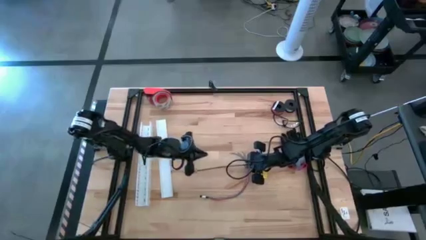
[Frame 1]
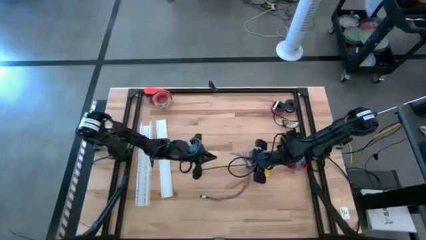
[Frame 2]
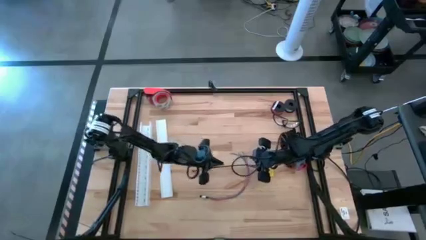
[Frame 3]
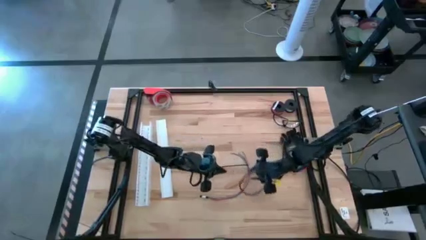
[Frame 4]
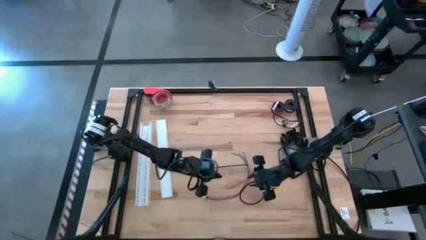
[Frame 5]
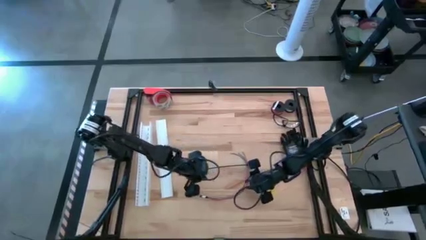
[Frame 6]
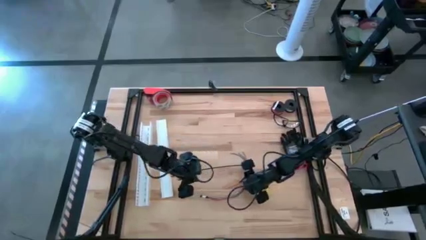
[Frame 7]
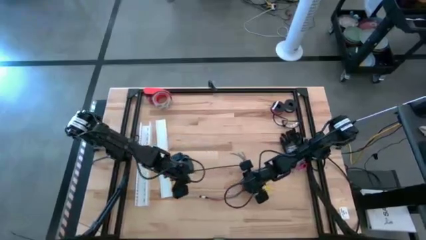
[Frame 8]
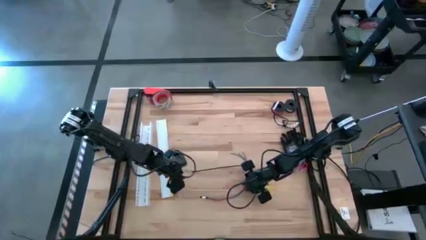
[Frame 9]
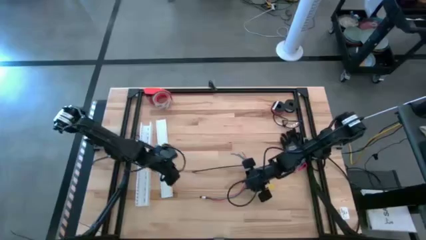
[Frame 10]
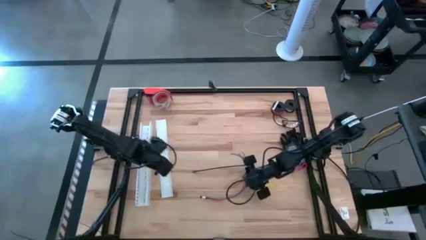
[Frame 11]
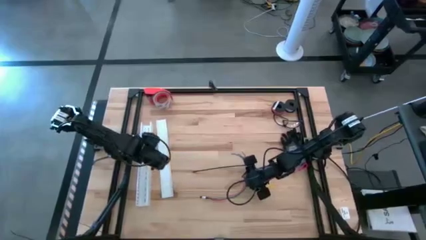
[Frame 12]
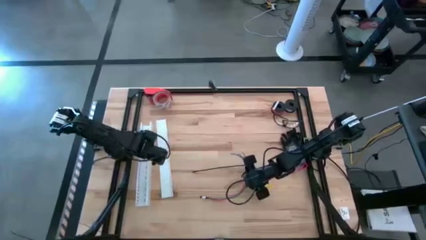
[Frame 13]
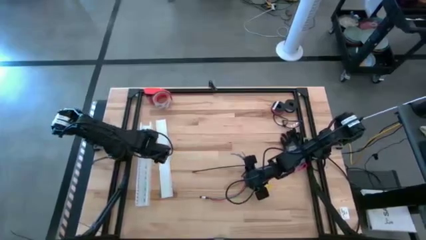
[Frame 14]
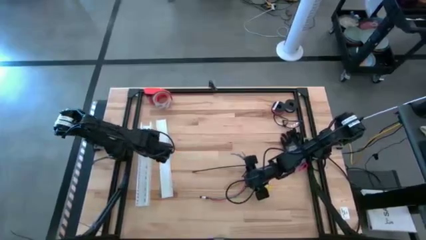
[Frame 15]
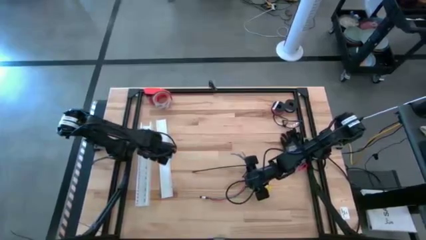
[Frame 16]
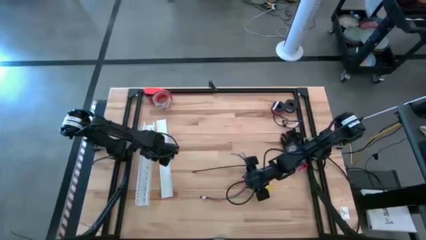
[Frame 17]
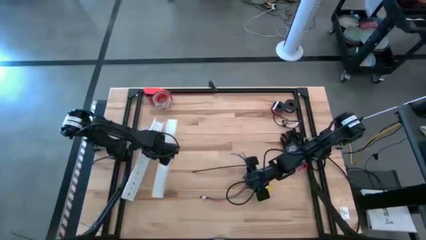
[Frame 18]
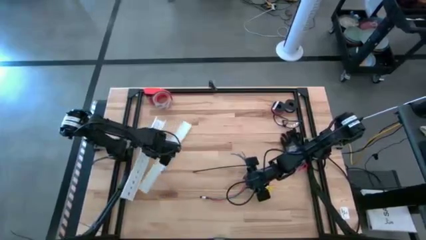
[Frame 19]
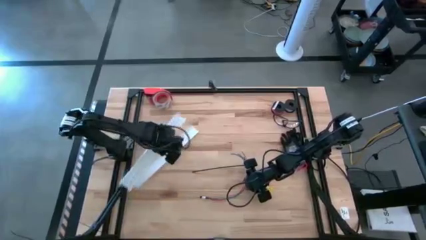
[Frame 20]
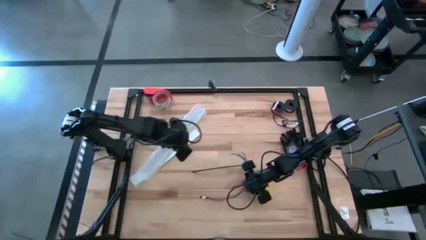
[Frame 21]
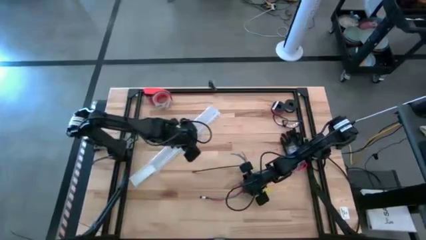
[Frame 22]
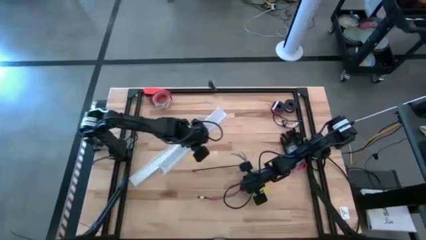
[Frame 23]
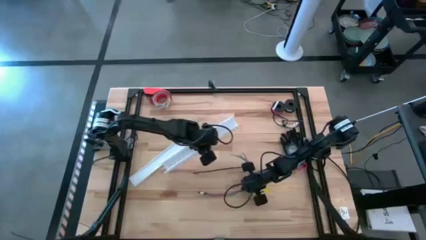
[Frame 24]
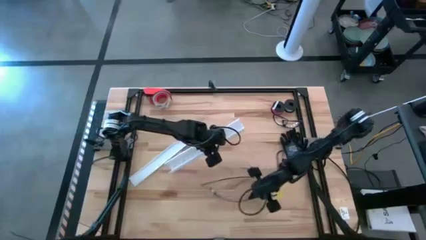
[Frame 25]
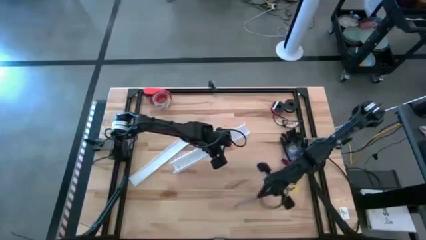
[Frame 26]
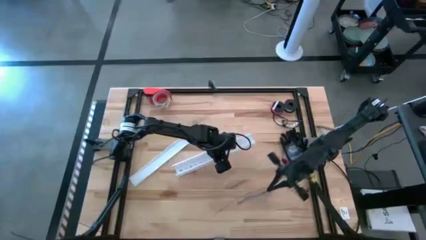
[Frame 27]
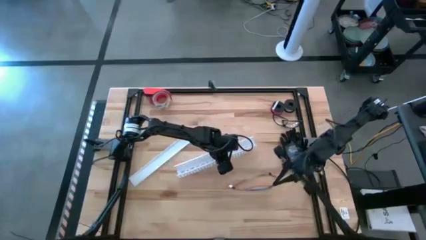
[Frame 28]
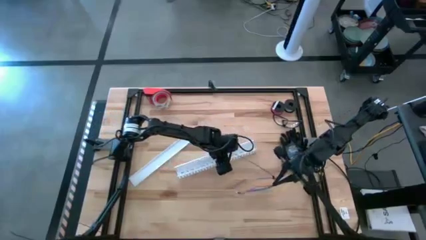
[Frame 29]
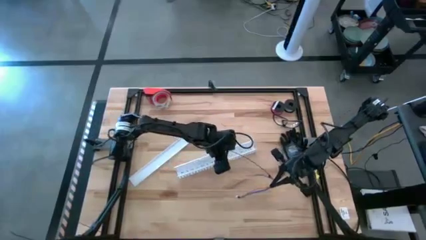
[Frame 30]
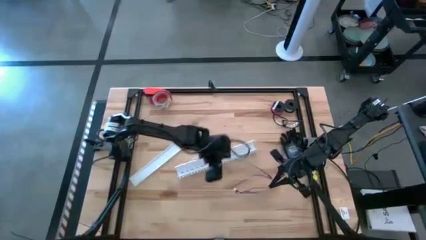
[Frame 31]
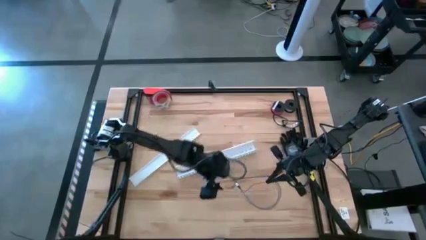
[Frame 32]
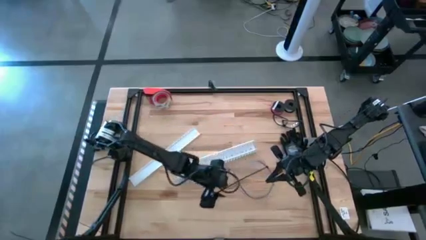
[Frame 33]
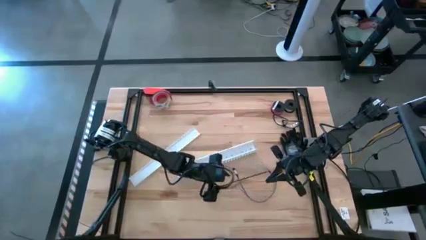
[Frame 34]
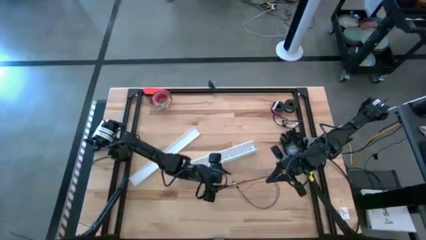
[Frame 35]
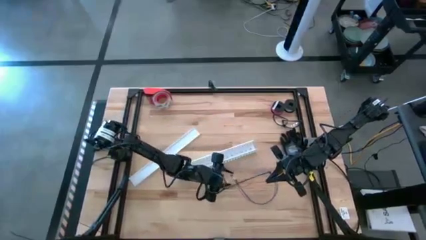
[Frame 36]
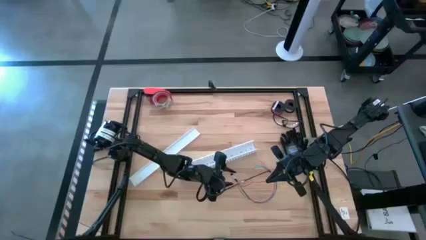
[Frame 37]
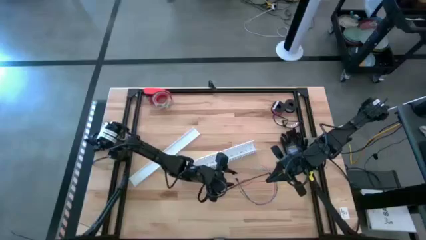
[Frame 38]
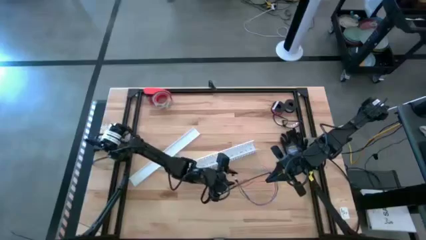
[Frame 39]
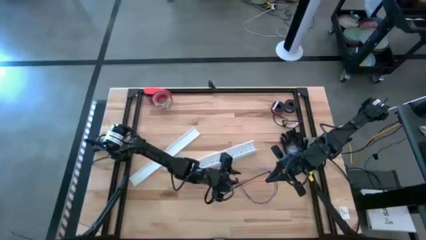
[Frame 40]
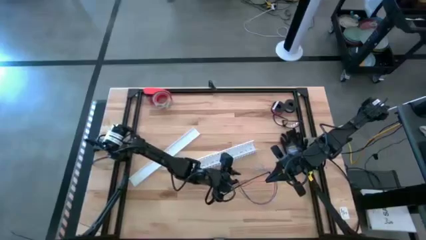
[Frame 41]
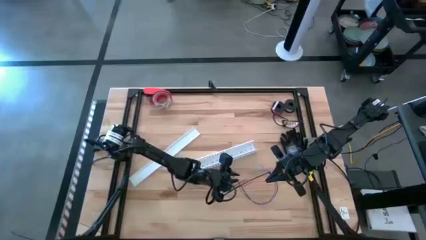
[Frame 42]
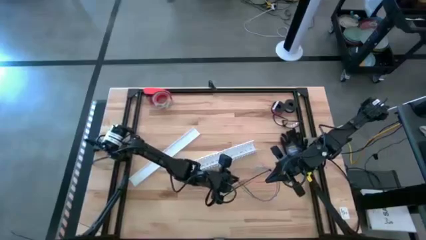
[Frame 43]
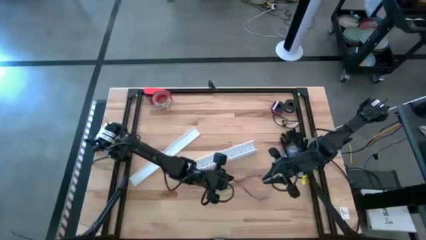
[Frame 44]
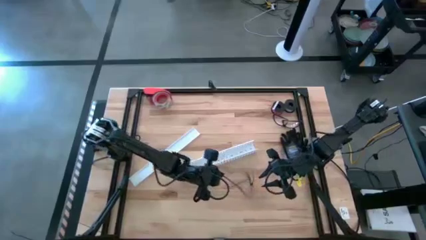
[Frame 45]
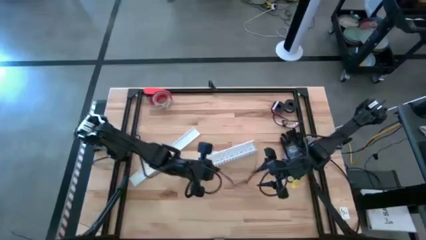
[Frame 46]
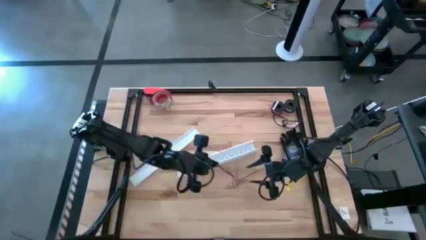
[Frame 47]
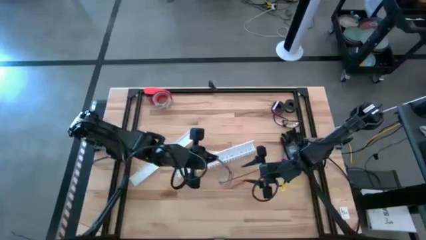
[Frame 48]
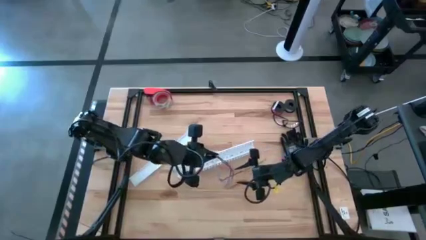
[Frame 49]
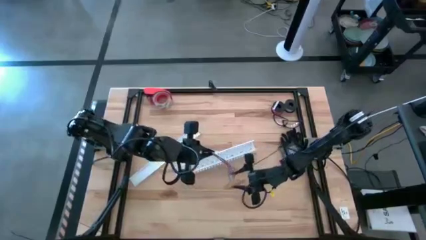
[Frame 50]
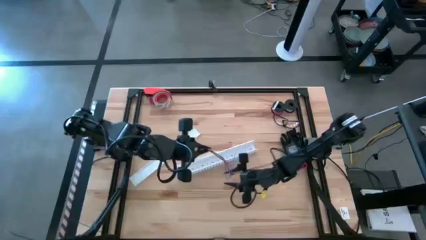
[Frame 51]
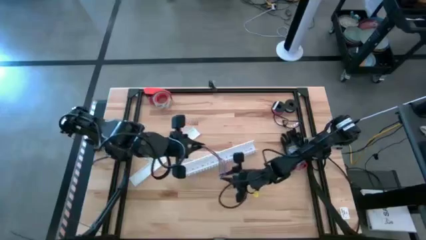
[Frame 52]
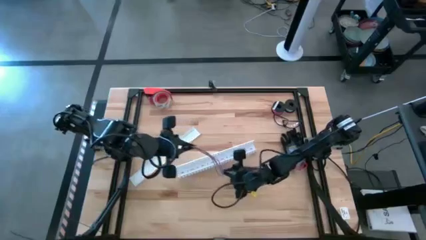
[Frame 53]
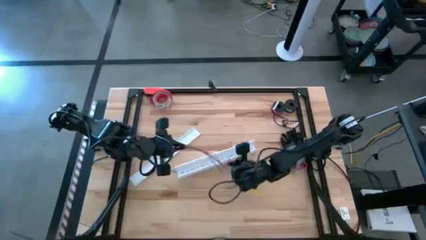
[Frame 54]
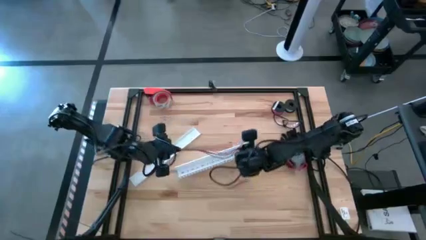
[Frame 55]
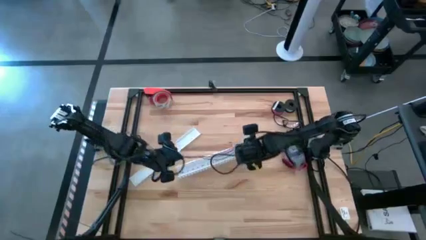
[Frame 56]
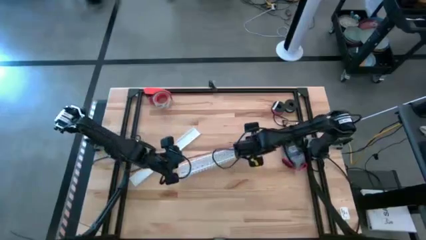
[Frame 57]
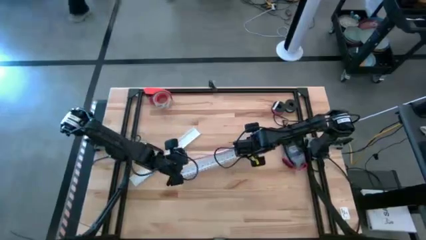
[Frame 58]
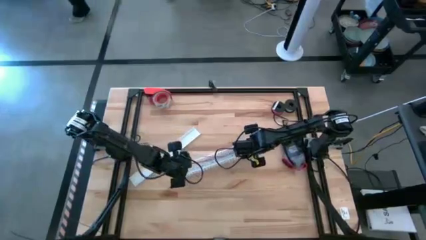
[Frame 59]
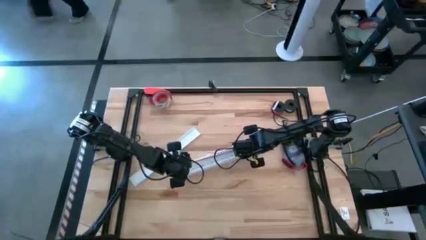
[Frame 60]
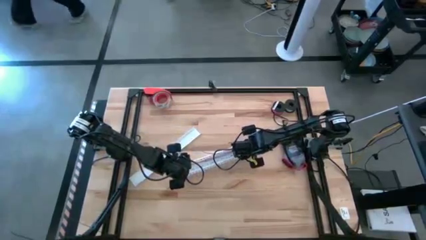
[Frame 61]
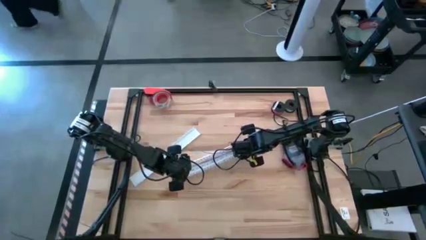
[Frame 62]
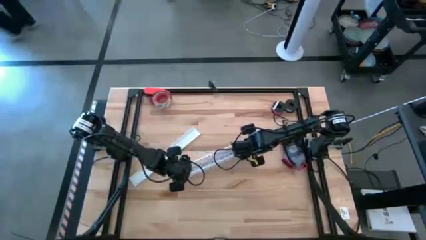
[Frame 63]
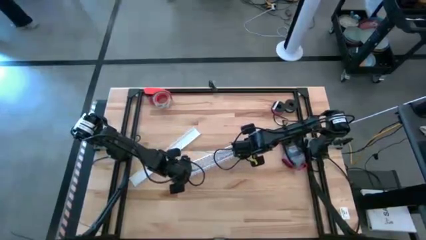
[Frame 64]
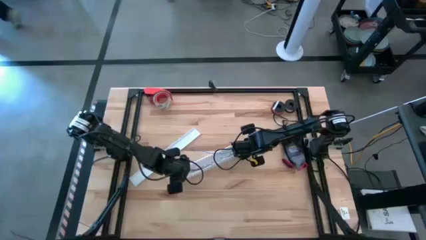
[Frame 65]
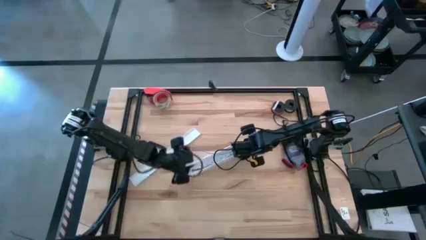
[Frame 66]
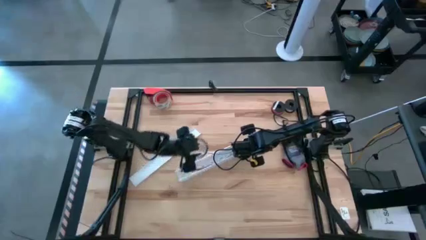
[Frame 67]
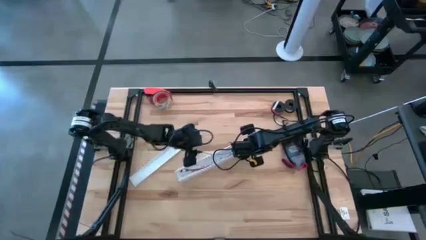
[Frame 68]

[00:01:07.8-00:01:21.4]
Task: Ziptie cables
Put the zip-tied cables into the white cable duct

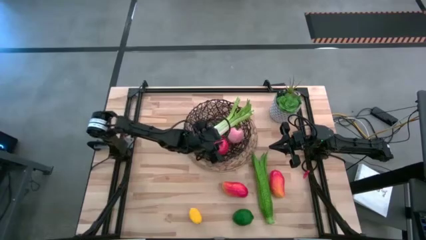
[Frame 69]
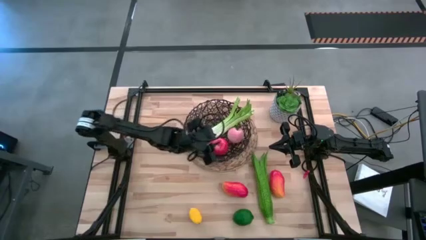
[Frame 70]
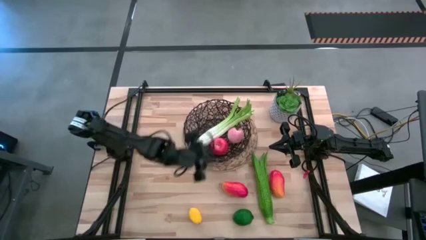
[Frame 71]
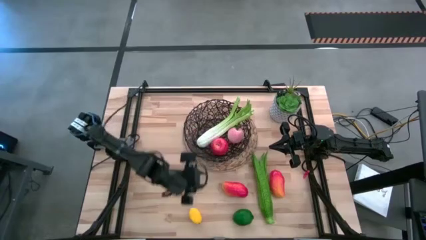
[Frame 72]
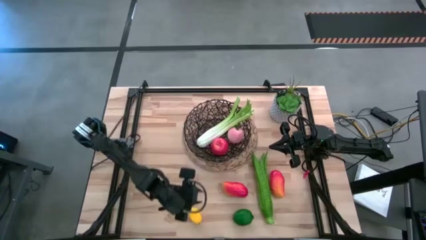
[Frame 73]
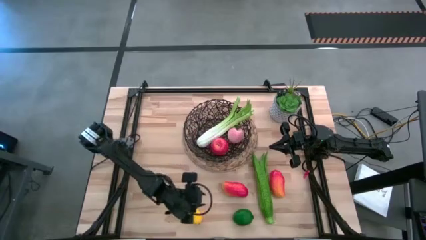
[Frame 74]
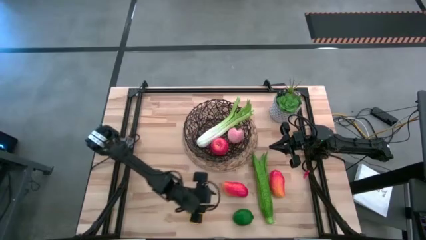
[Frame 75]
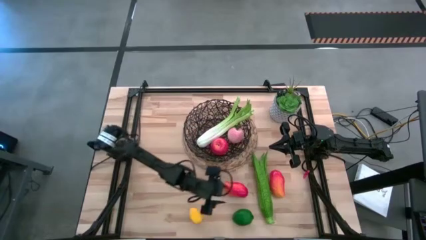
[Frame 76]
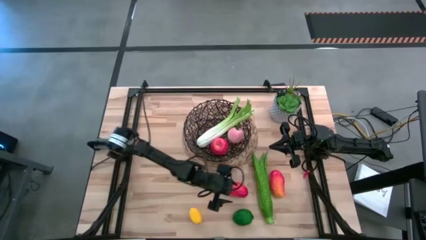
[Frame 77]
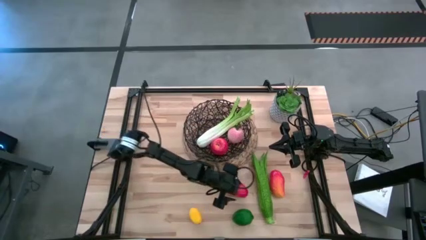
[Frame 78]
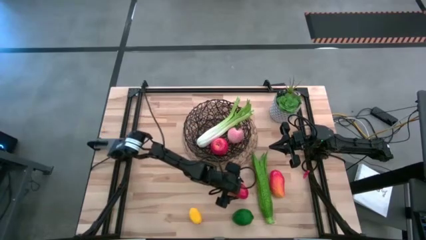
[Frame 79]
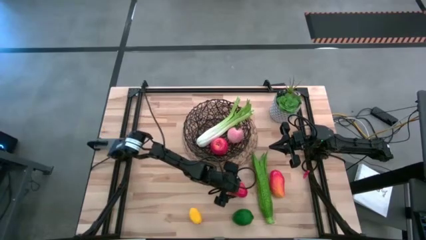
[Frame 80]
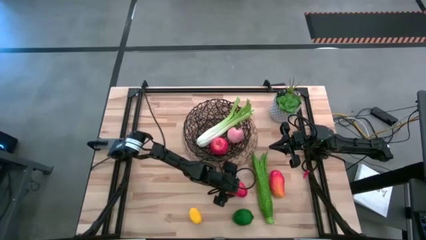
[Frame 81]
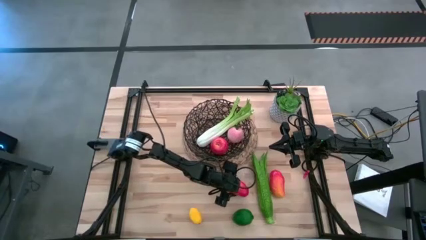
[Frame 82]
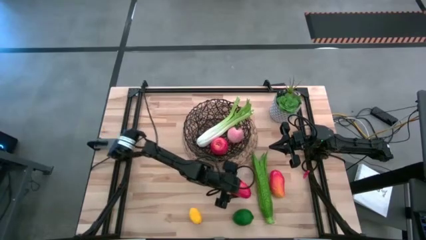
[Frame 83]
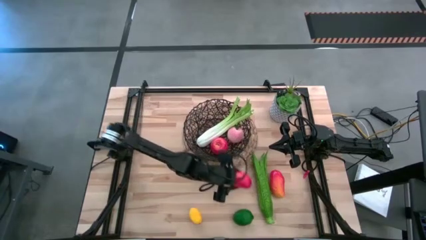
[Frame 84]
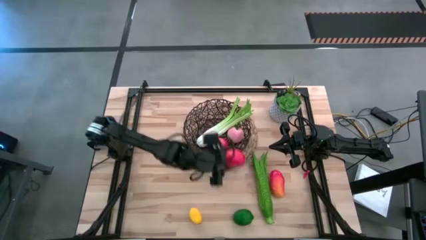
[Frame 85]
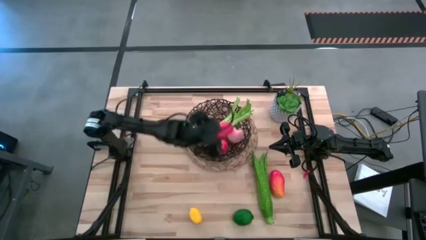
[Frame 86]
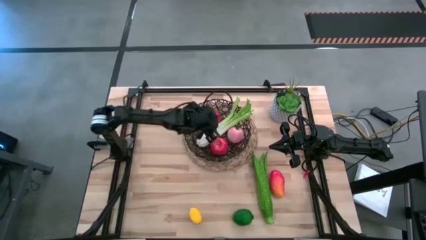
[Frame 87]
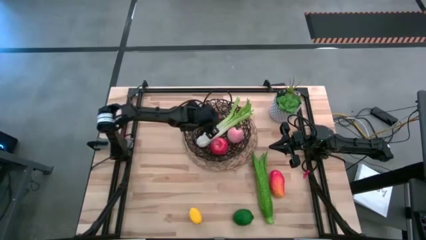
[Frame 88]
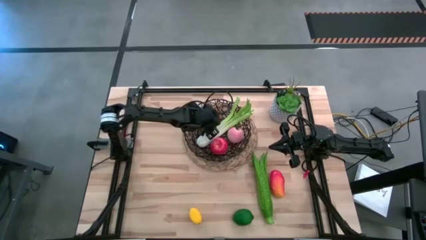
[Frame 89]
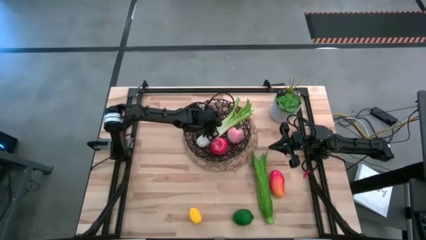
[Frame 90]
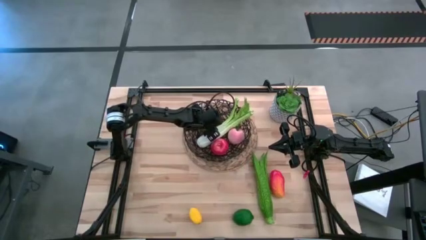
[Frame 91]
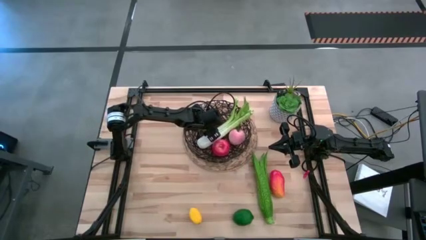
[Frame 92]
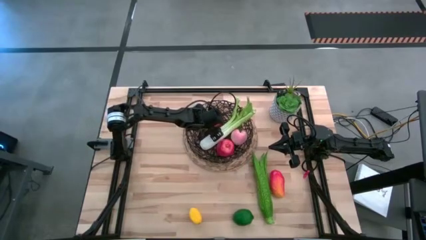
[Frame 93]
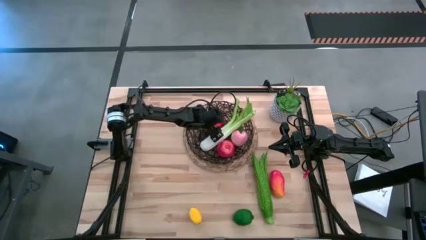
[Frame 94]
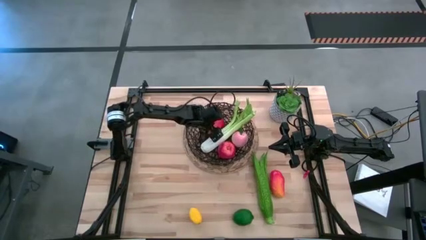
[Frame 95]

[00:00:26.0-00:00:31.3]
Task: Build produce basket
Put the orange mango into the black mesh basket
